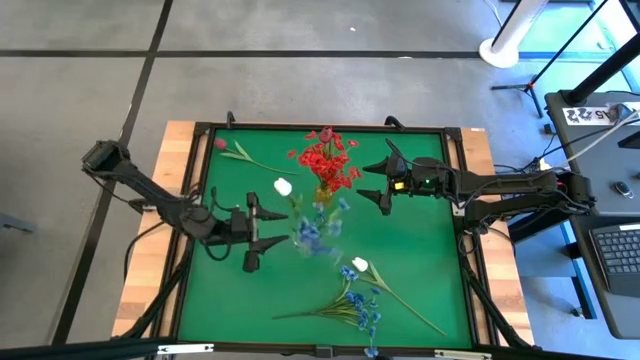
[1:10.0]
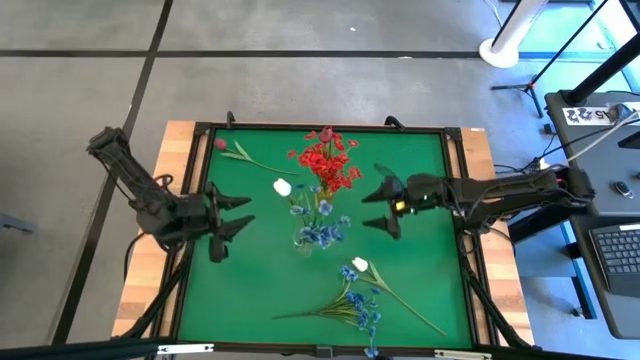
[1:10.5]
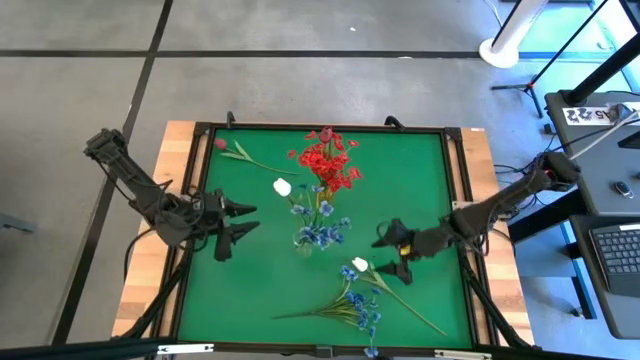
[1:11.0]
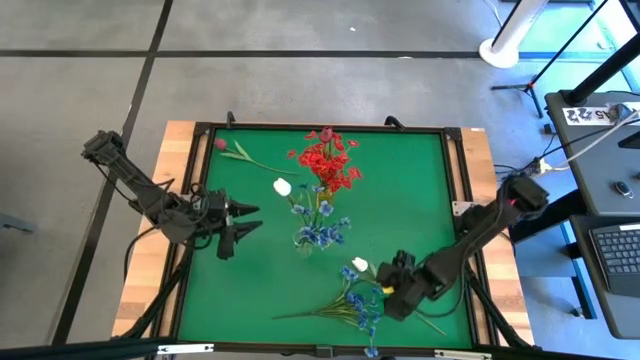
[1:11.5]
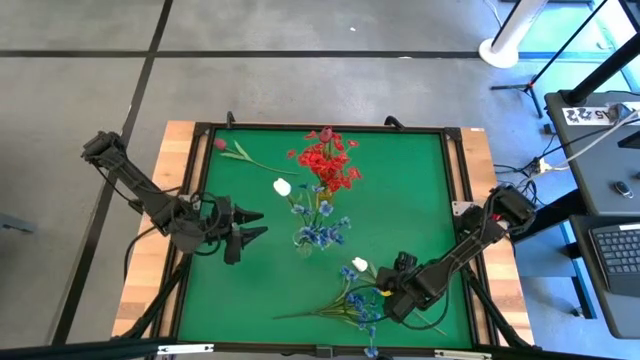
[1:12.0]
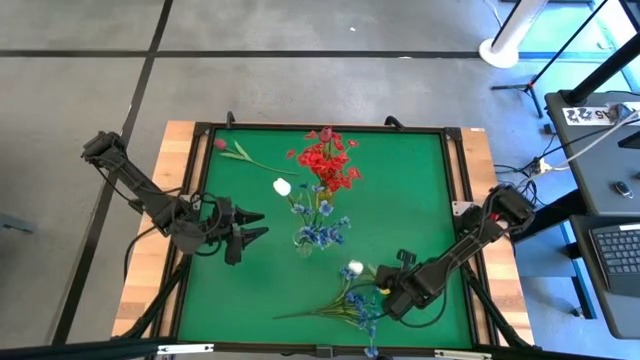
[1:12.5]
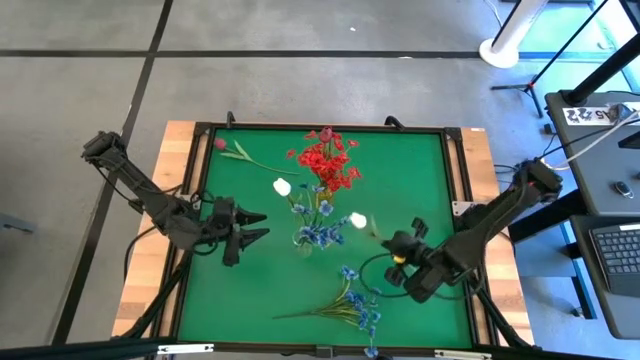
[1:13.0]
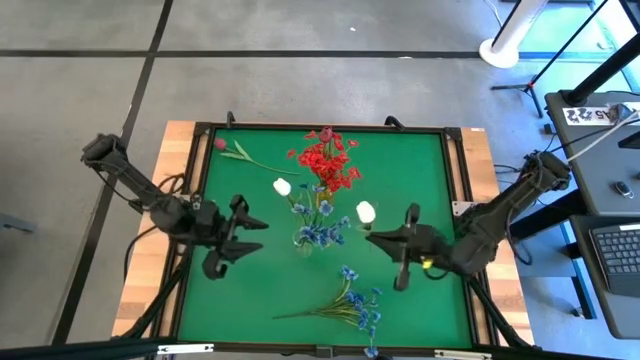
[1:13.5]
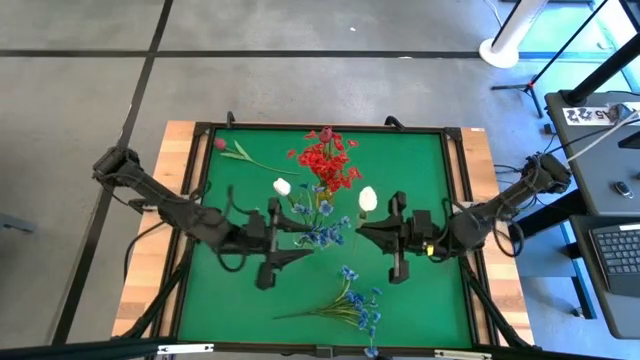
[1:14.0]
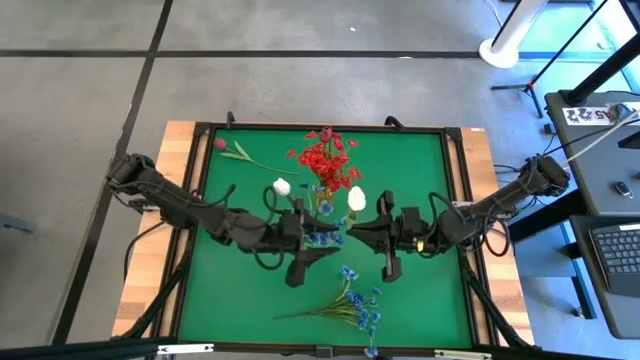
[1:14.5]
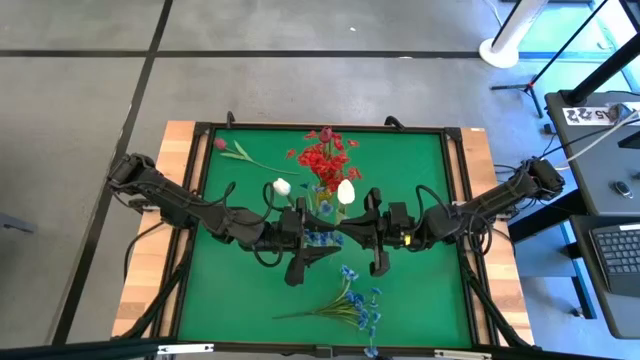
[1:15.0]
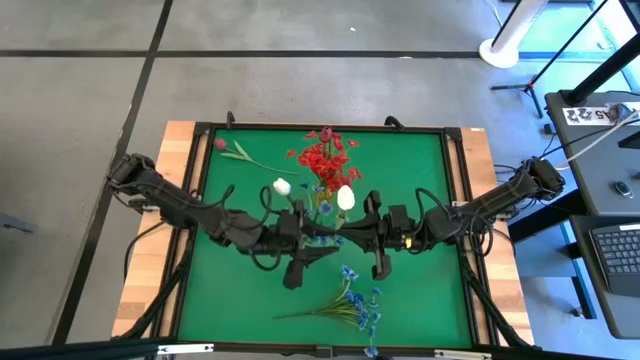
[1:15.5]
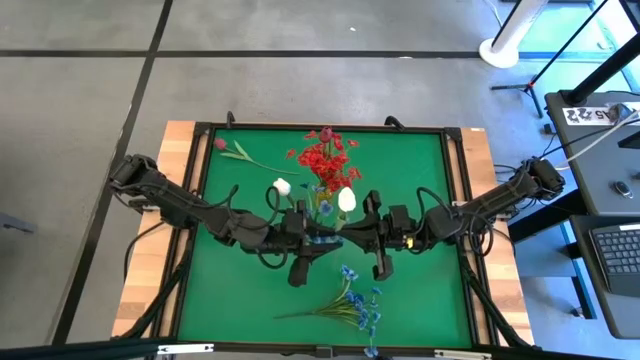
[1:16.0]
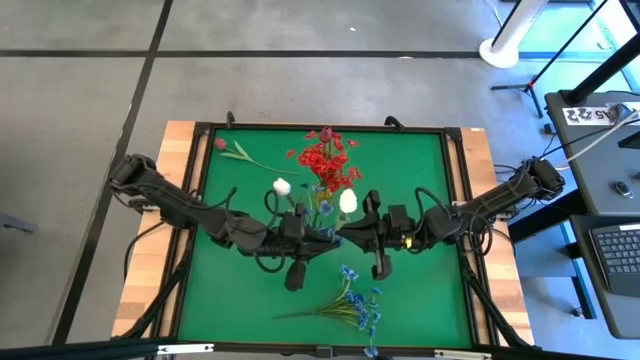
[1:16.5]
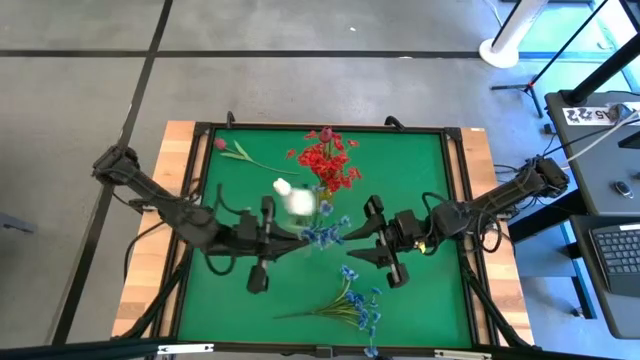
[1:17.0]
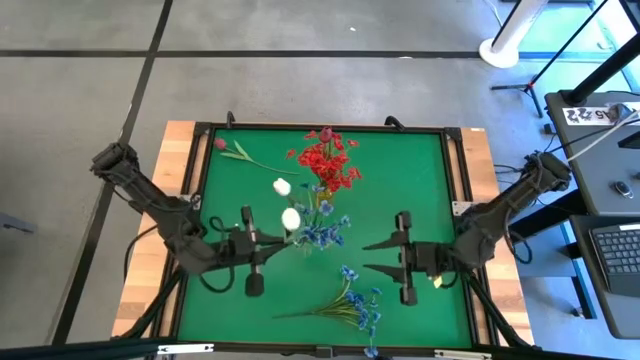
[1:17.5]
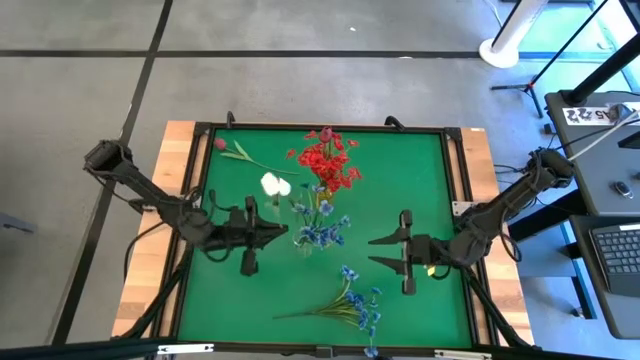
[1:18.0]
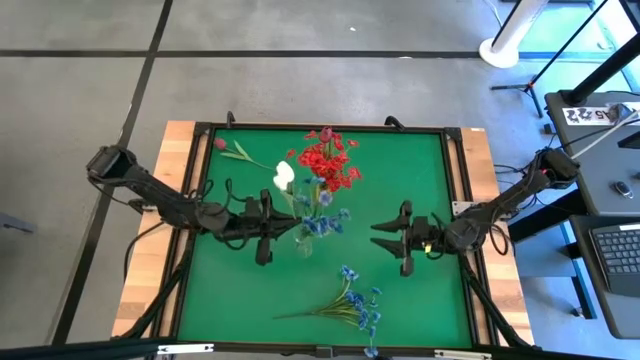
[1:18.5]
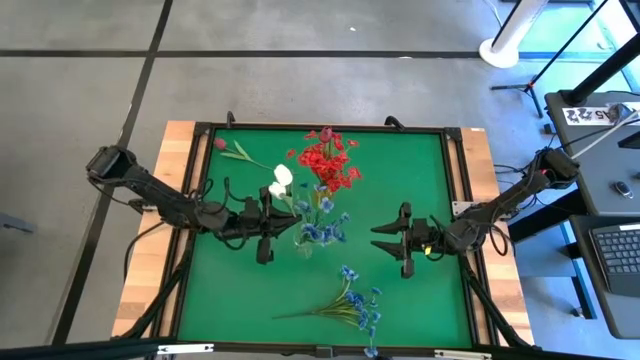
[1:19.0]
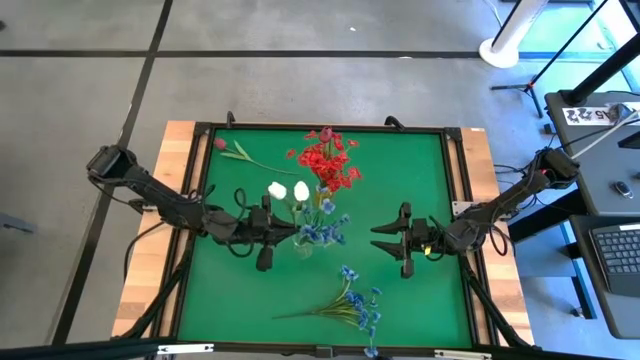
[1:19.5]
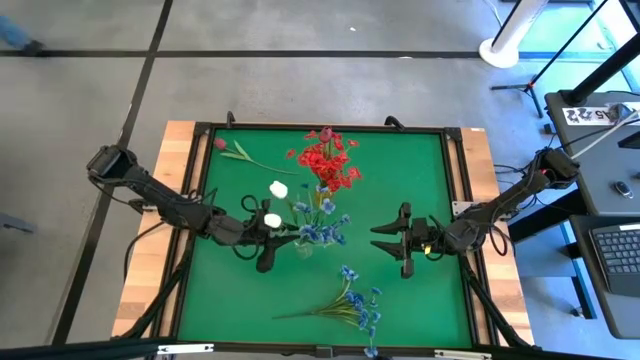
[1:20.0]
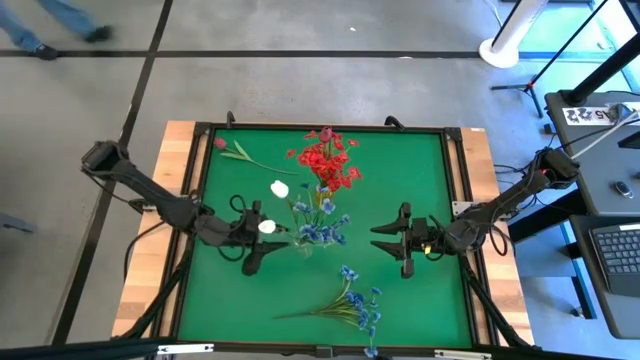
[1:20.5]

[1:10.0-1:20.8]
Task: Sort flowers into vase by color
Put the white flower into the transparent flower vase

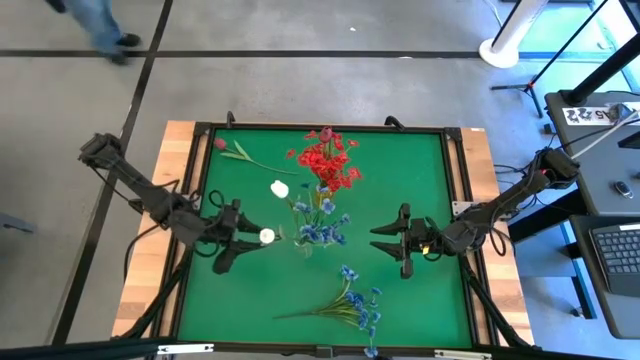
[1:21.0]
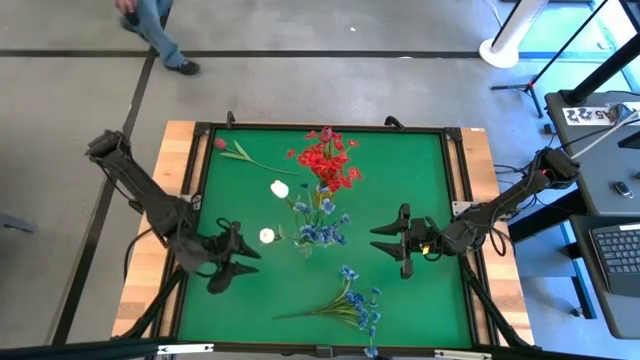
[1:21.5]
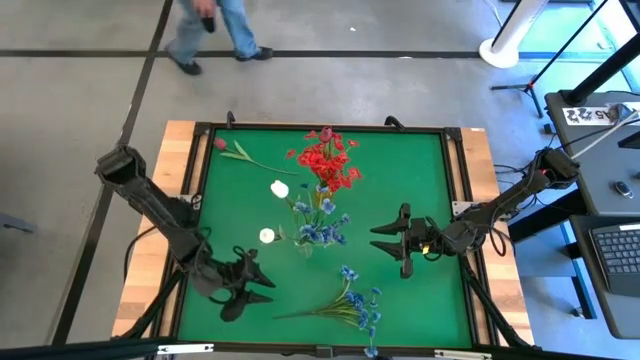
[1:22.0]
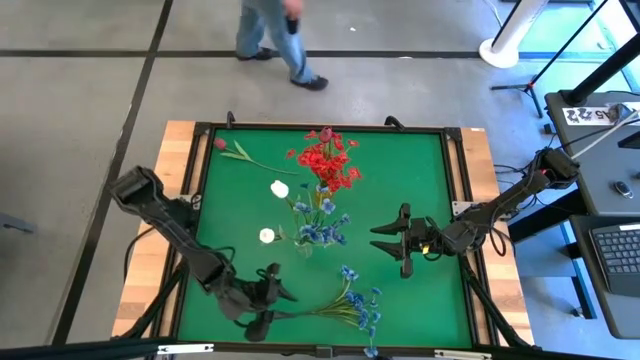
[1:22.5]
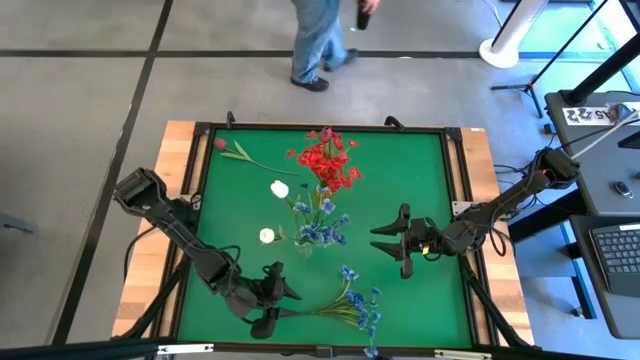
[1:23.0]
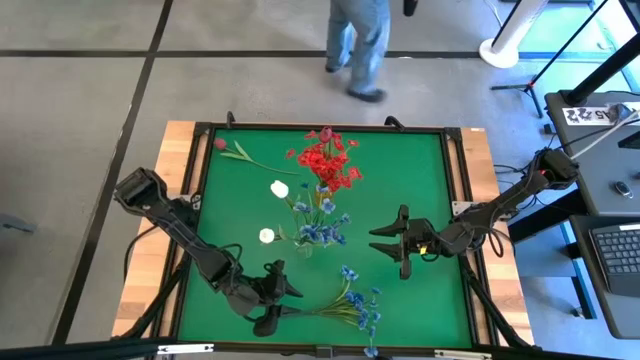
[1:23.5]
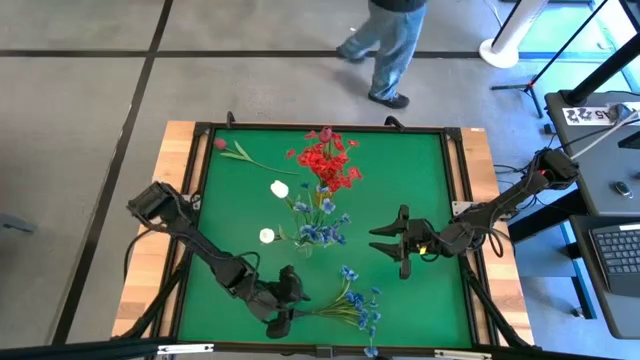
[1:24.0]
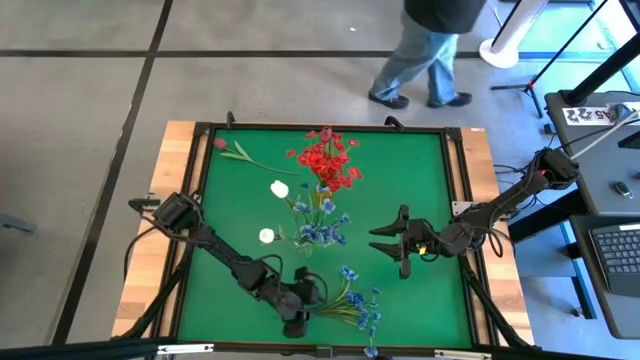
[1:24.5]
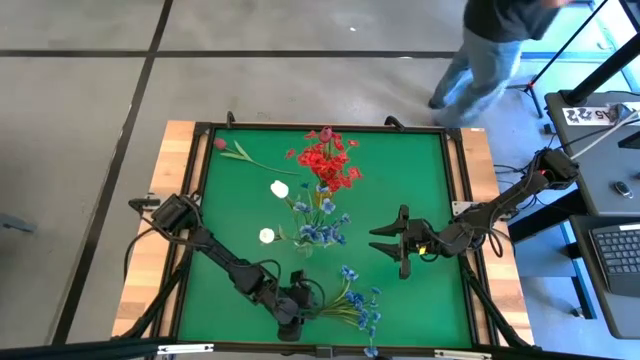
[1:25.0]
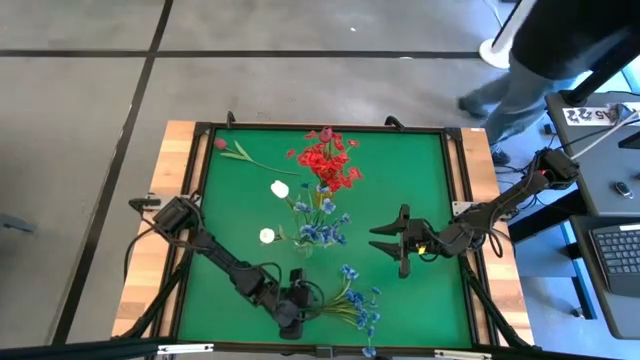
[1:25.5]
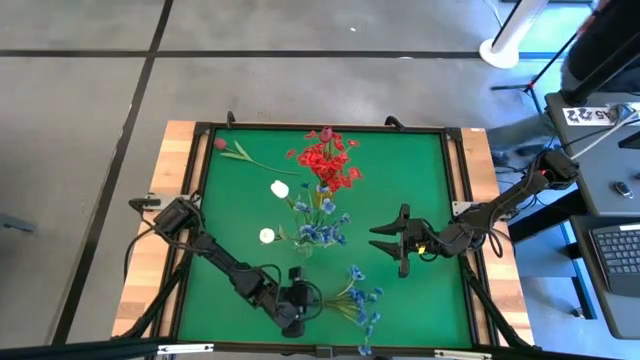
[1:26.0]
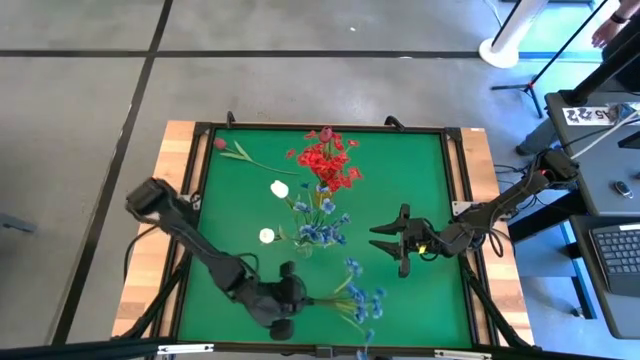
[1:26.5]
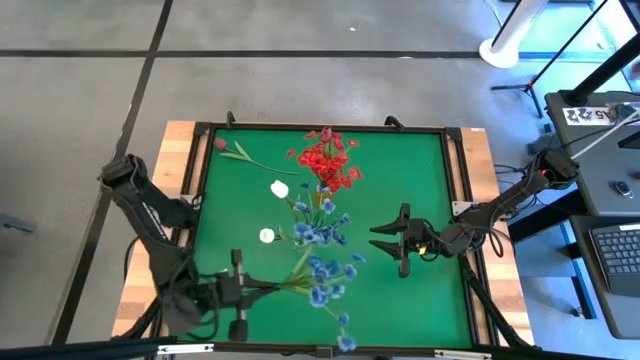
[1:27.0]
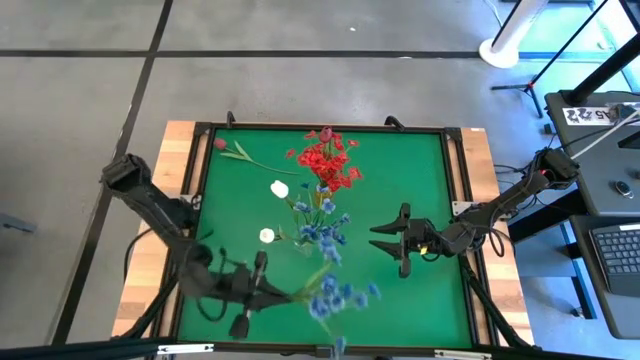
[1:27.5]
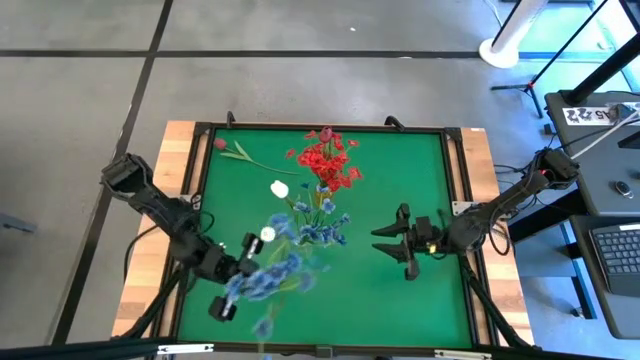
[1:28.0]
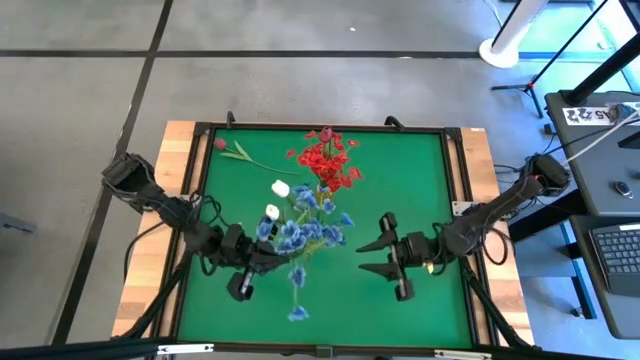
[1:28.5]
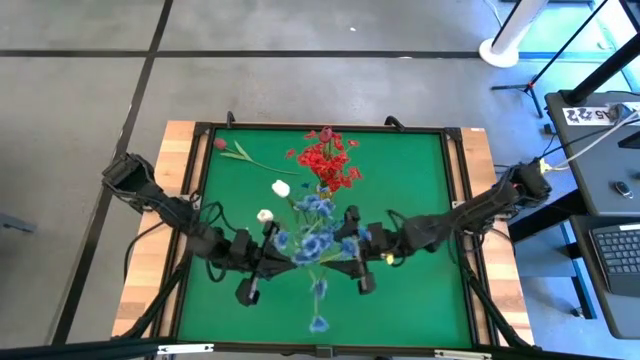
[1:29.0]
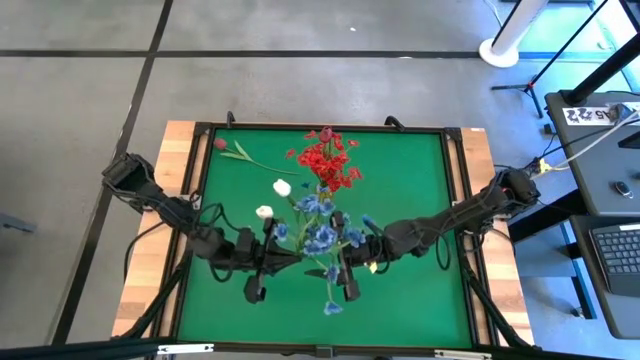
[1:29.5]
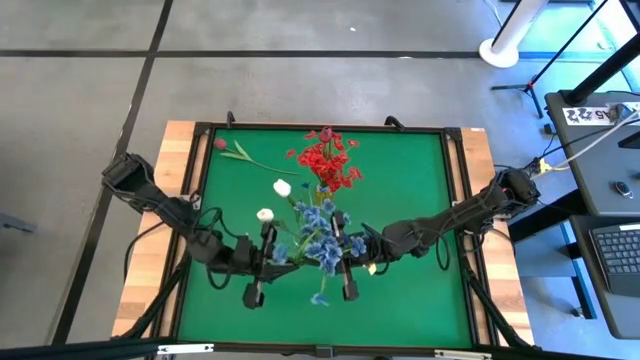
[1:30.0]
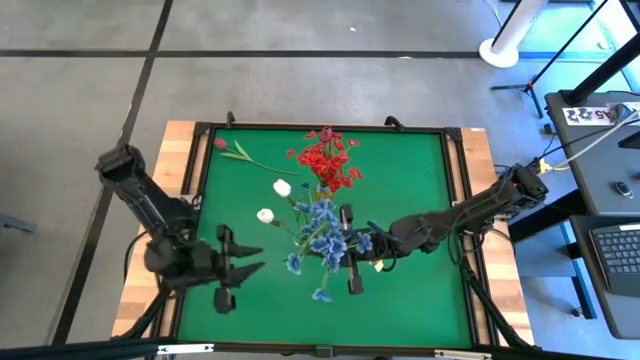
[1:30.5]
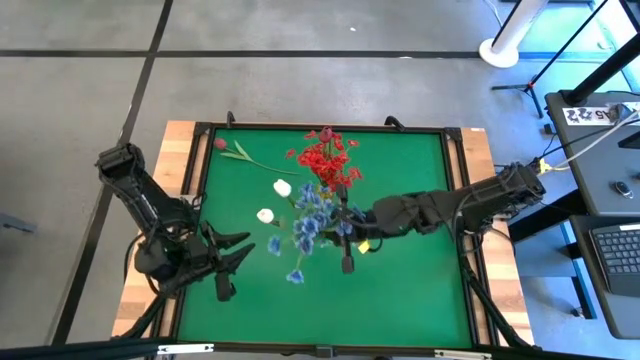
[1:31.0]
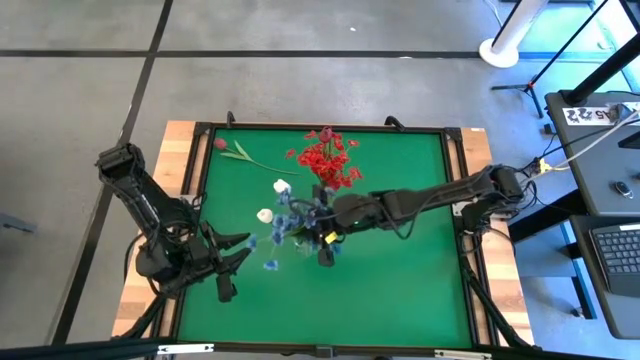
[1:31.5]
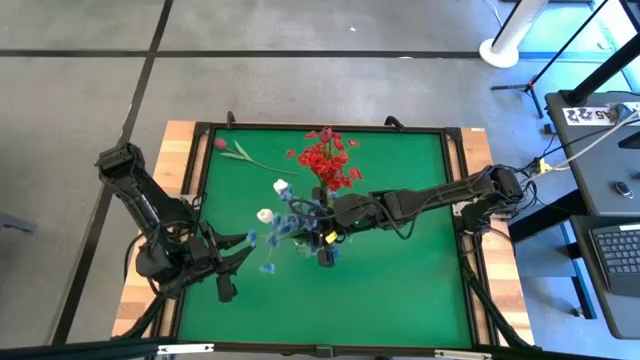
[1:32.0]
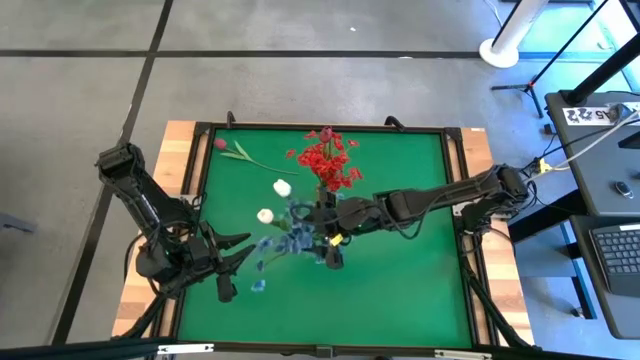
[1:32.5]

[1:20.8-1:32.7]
Put the blue flowers into the transparent flower vase
